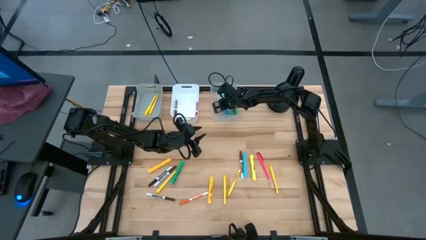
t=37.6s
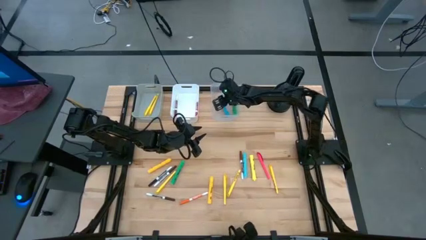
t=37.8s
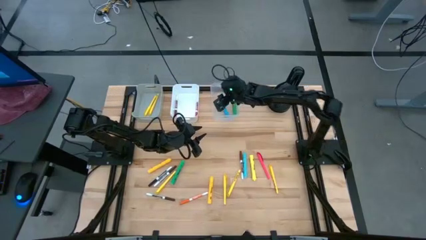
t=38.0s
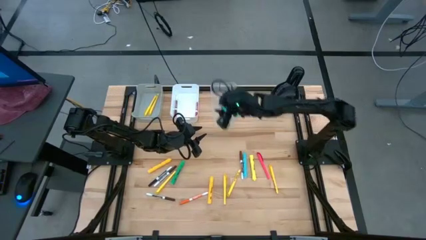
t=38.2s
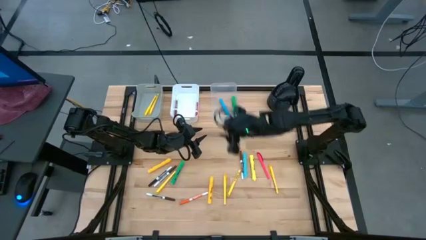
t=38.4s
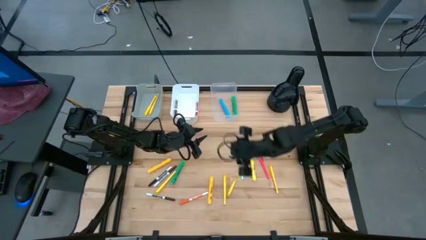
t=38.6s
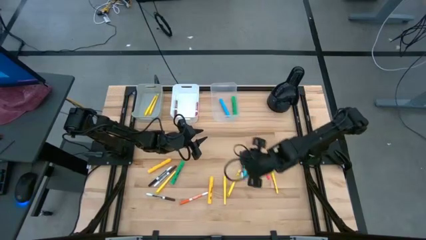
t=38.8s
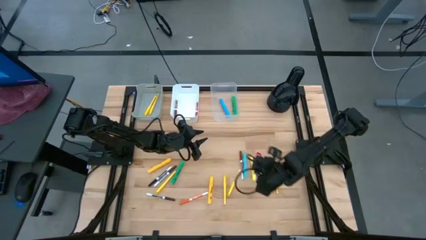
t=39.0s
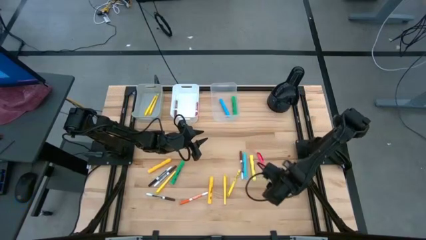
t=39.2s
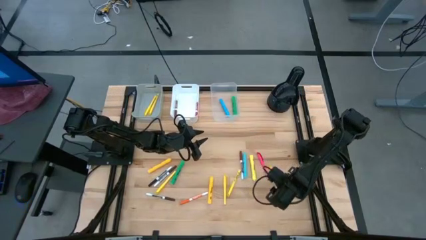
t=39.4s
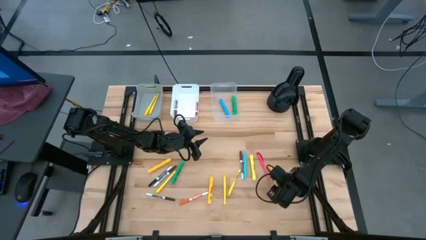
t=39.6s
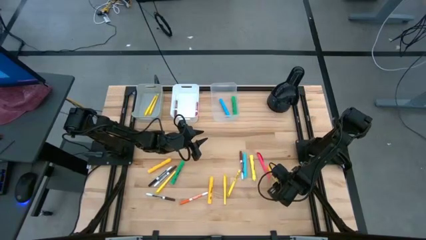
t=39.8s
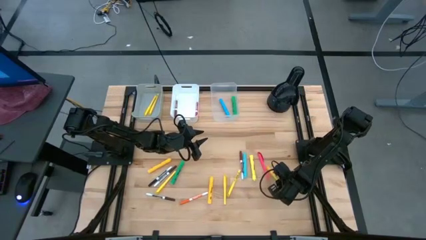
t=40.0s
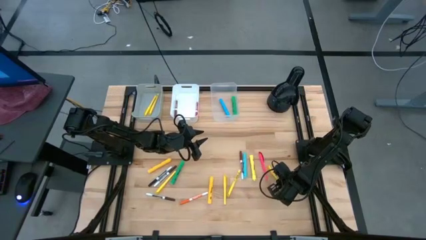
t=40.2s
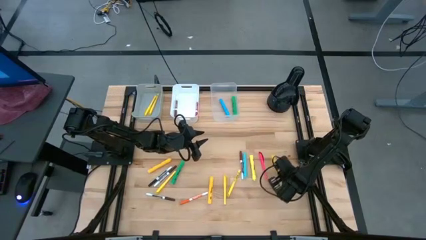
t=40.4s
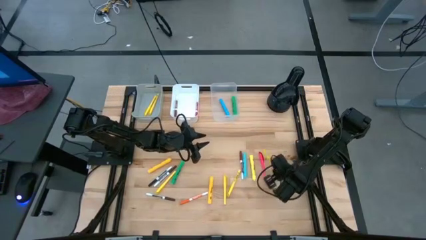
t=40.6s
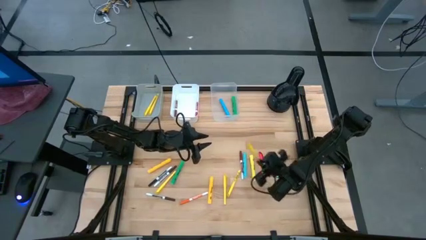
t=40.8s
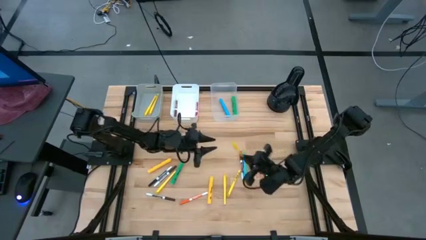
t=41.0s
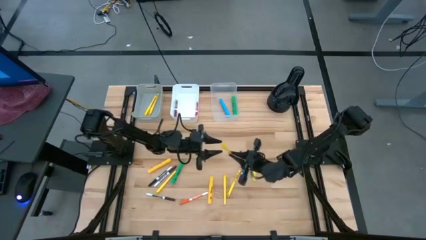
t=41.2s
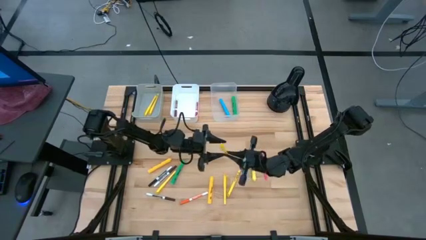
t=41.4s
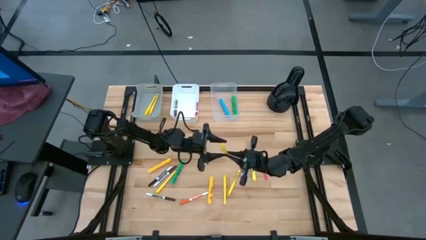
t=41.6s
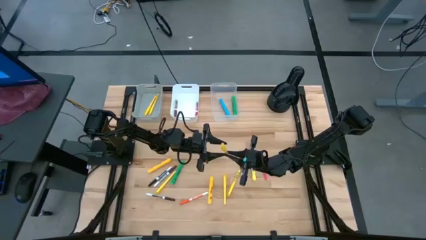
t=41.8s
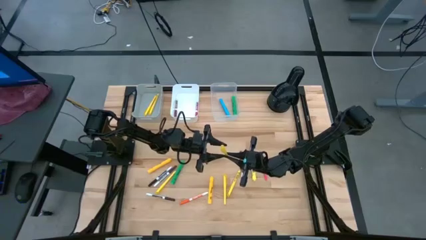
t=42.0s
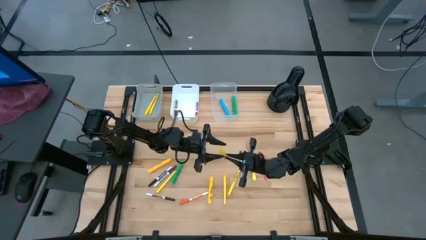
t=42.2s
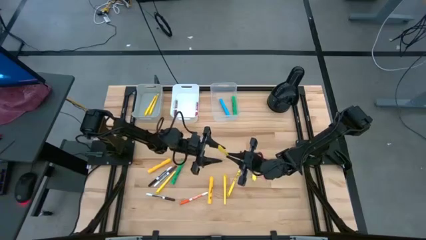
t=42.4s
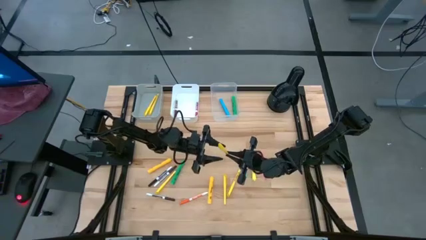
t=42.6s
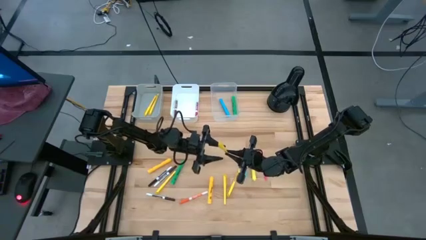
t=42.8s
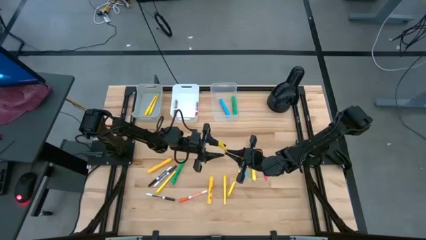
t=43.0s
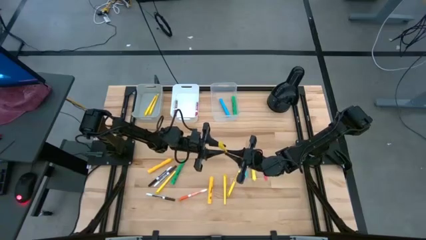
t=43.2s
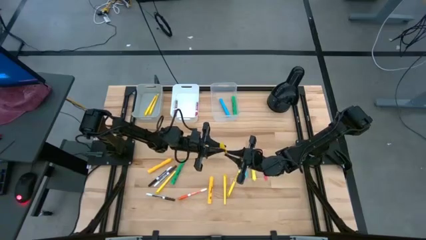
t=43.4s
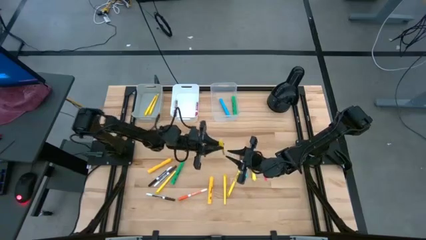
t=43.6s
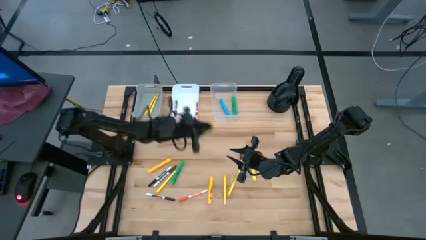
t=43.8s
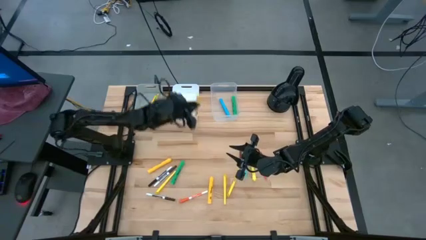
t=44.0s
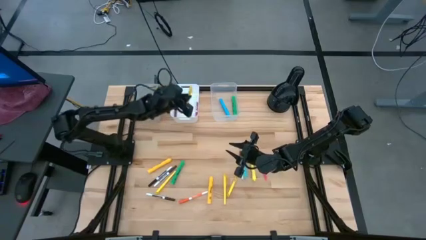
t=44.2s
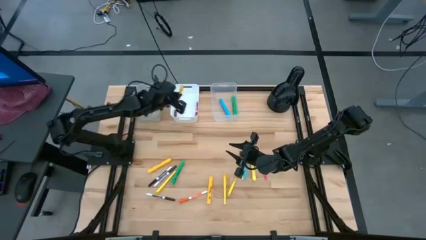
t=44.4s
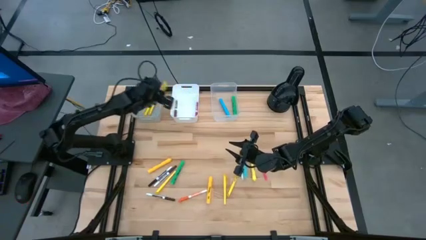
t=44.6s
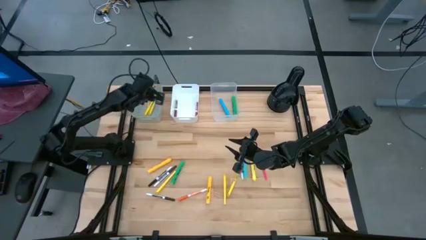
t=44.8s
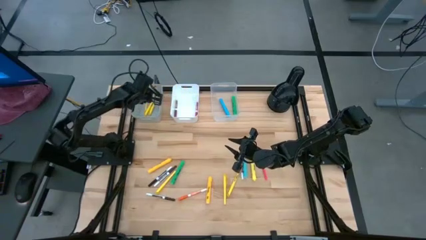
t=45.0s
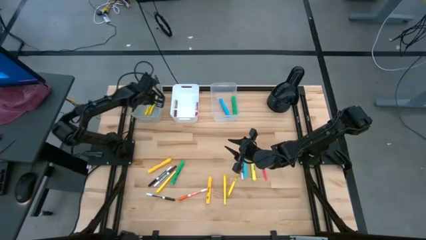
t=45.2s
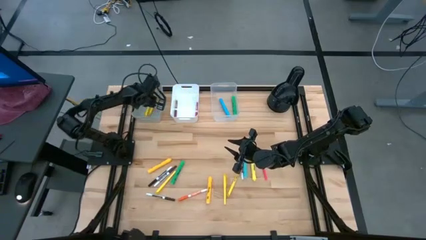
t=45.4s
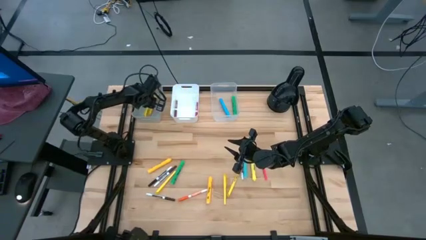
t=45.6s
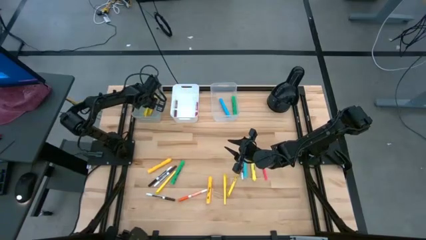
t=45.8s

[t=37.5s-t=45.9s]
Task: Pick & Place Markers
Put the yellow marker into the gray bin

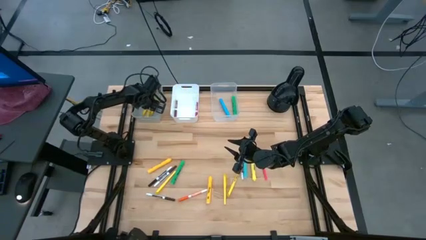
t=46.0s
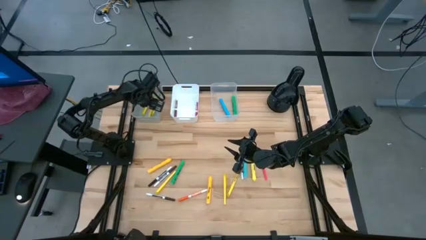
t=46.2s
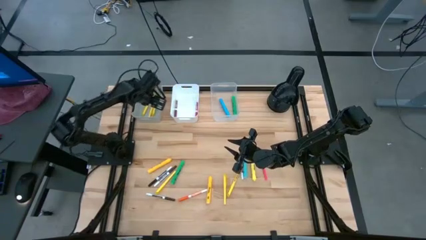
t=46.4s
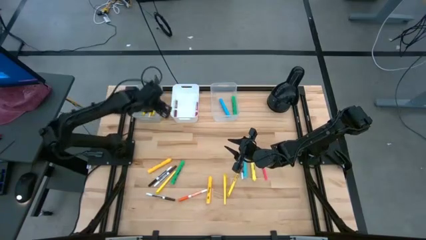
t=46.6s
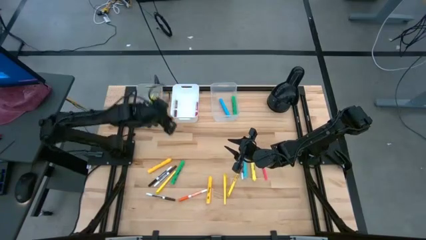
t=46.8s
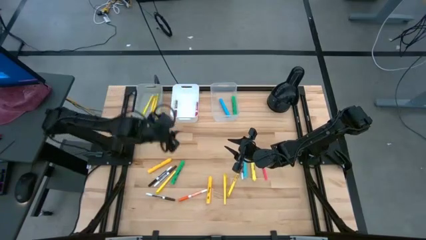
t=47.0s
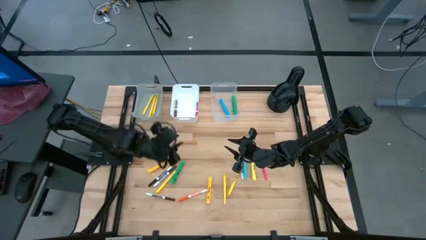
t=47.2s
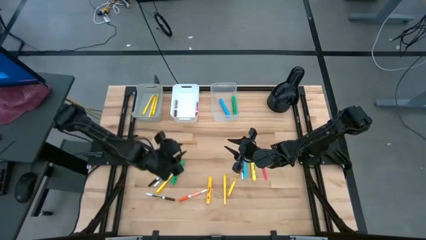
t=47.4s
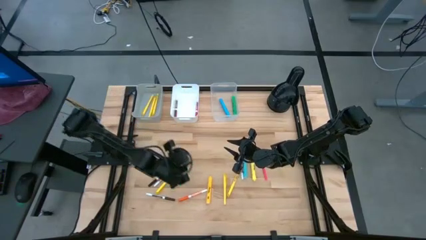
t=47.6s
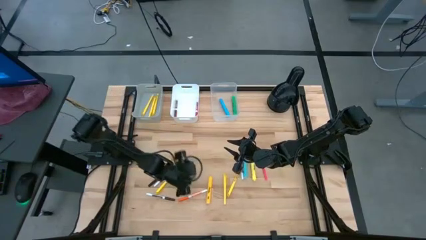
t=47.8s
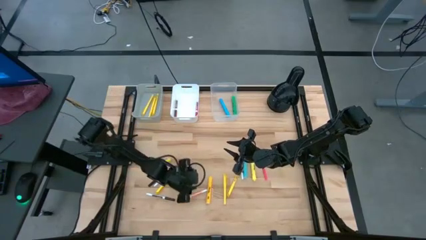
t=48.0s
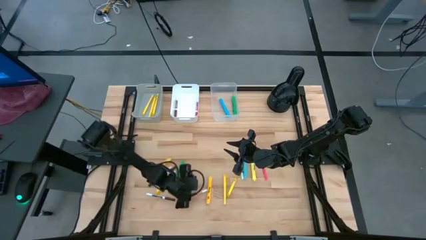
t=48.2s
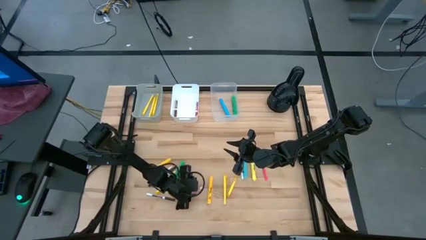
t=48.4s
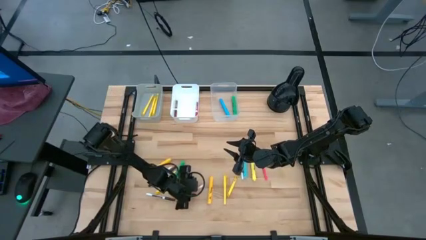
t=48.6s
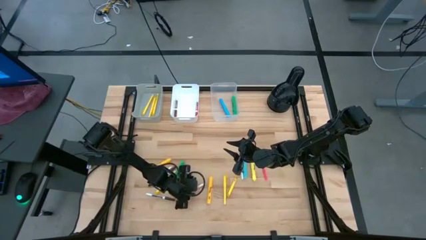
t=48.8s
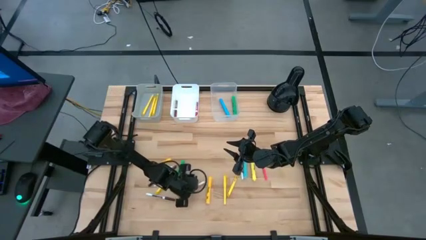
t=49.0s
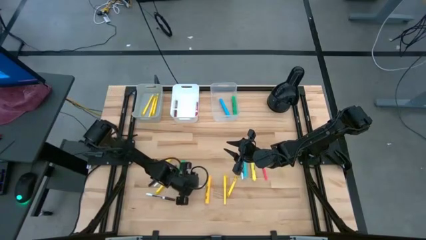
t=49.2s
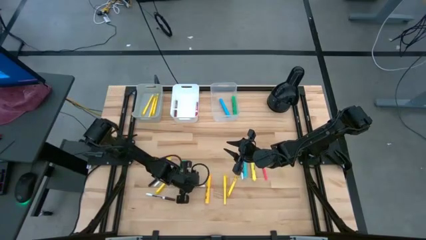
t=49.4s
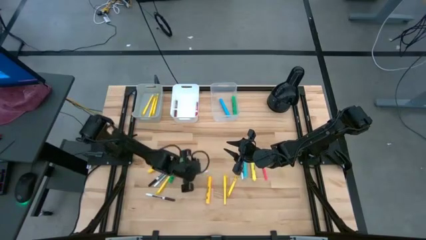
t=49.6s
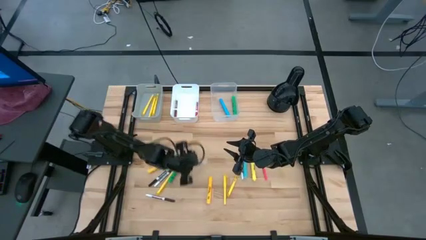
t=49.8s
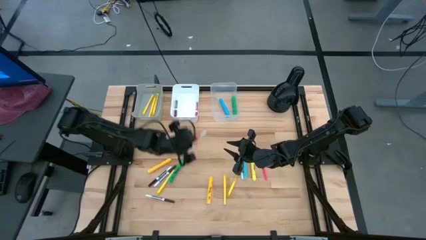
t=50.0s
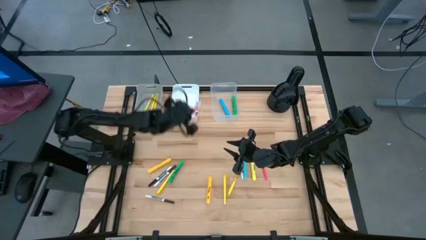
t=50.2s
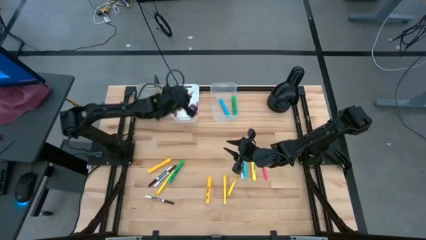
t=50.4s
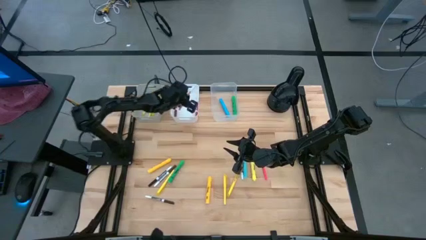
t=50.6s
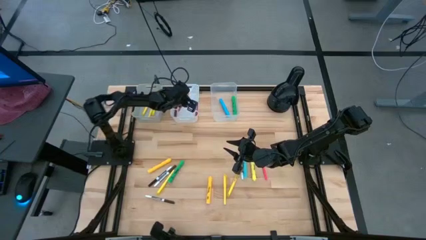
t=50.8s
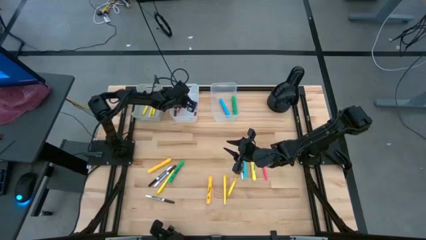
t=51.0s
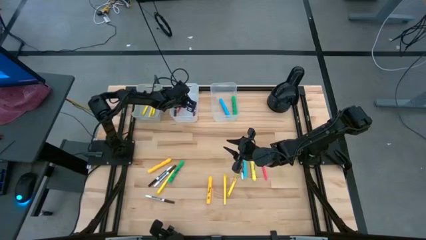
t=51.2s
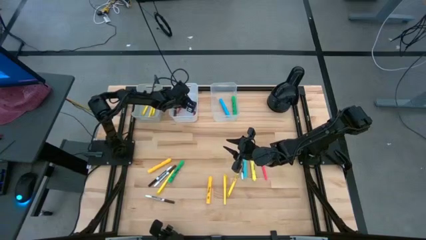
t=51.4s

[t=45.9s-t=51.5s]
Put the orange erase marker into the white bin

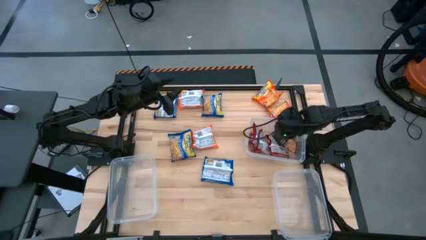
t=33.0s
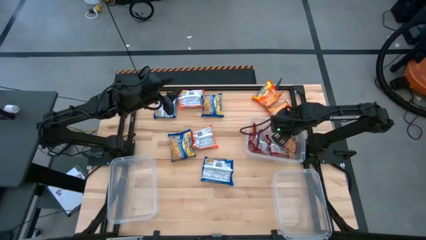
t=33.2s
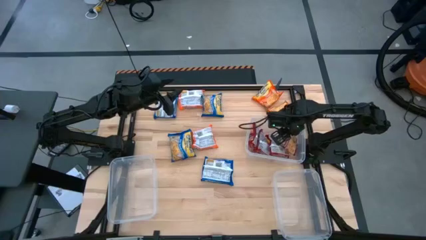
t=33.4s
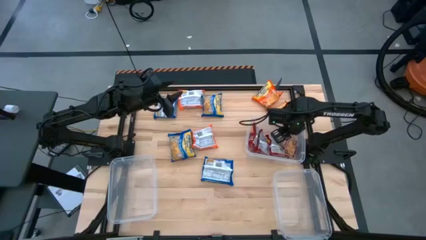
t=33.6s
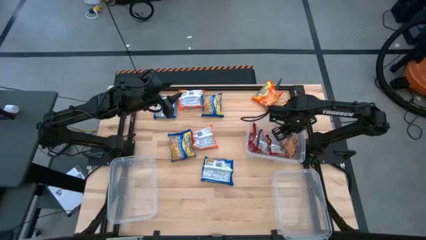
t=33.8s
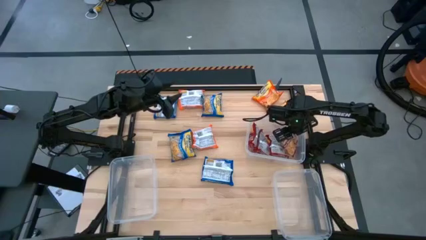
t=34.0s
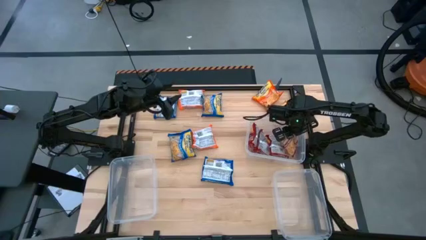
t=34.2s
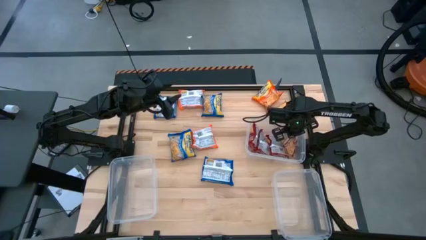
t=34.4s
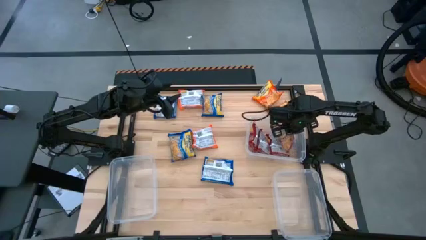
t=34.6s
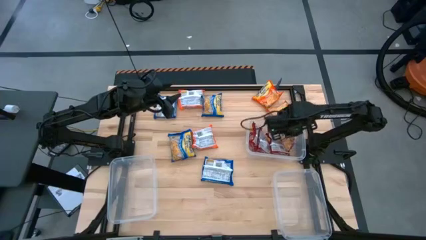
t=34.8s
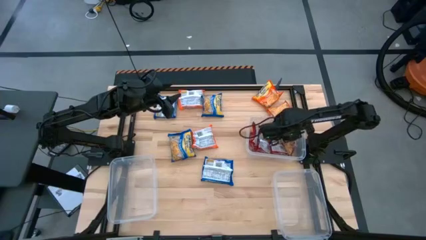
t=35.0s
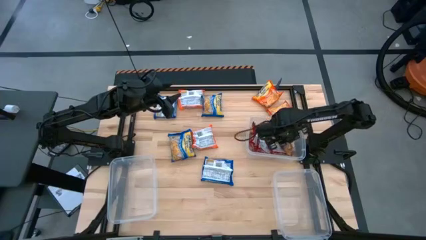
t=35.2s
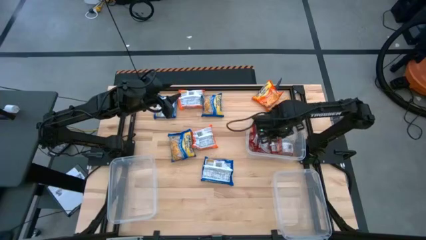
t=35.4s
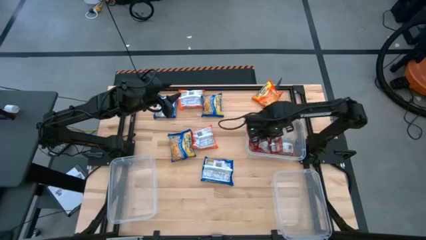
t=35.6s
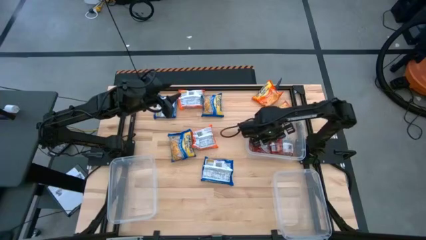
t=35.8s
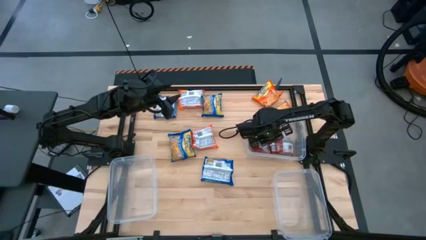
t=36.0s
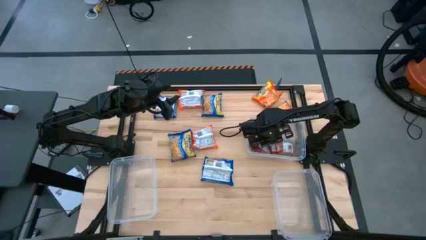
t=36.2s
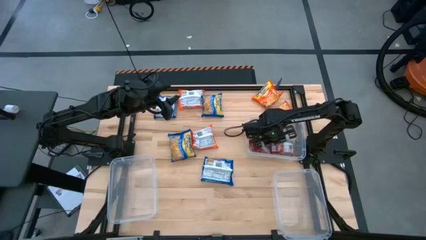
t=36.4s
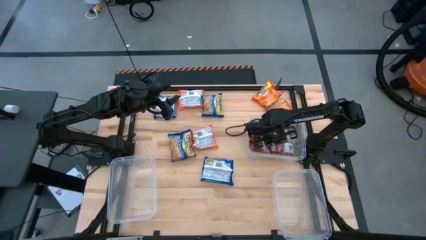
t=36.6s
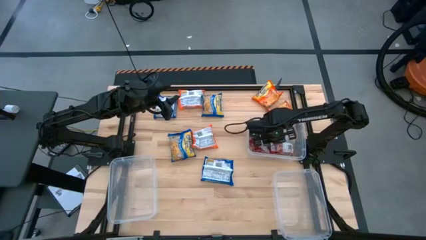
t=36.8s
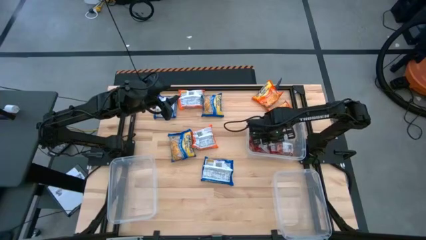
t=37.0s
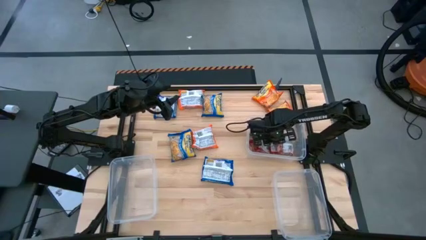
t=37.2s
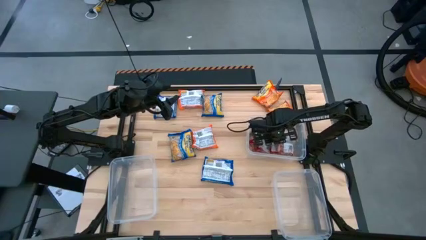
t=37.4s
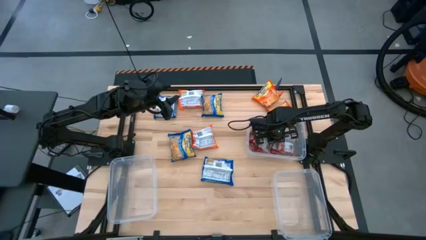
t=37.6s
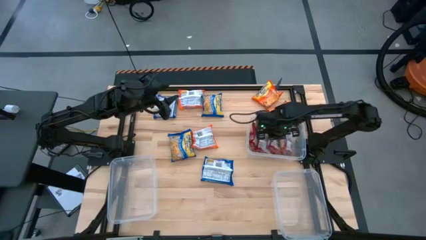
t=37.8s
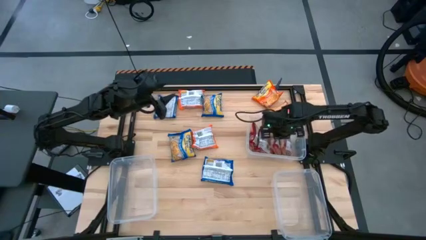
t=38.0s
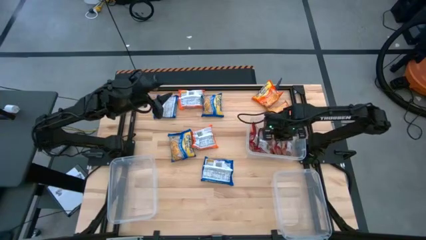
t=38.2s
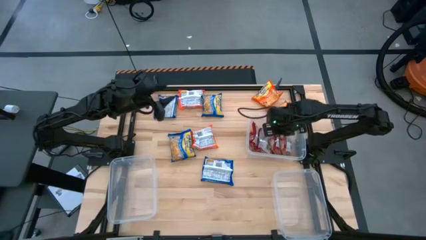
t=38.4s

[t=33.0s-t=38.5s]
Task: Sort Maruchan noodles
Adjust the red noodle packs
